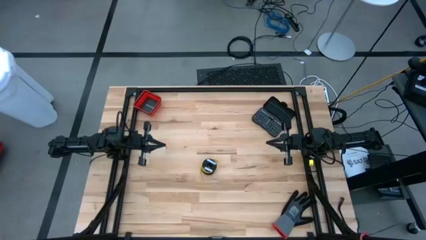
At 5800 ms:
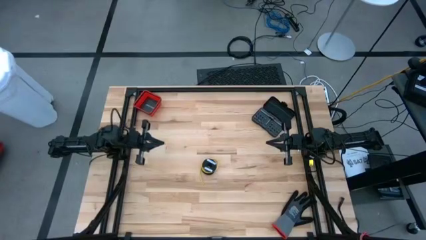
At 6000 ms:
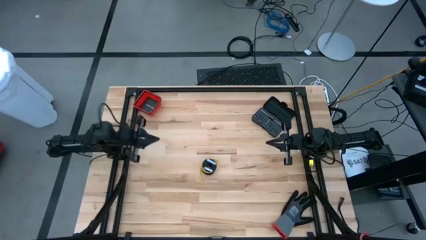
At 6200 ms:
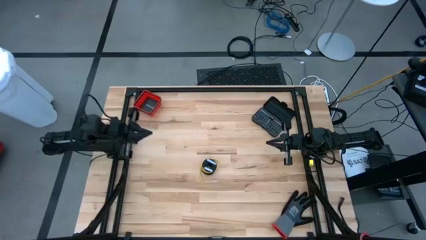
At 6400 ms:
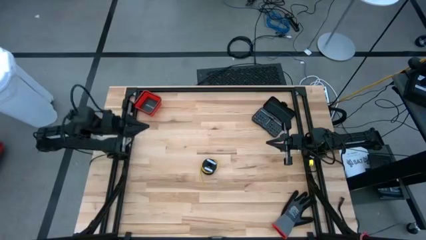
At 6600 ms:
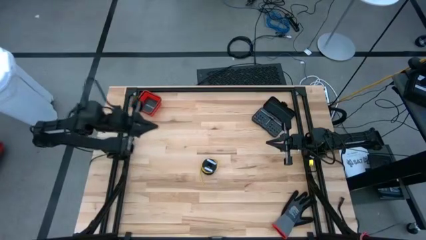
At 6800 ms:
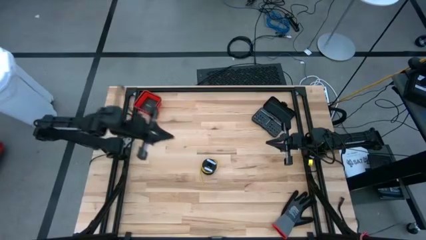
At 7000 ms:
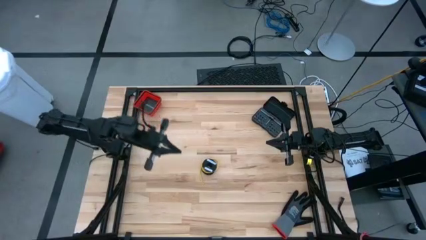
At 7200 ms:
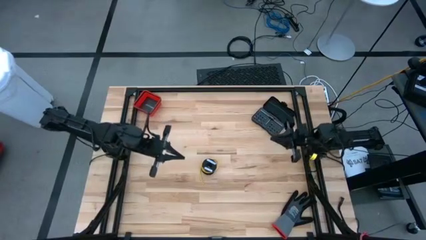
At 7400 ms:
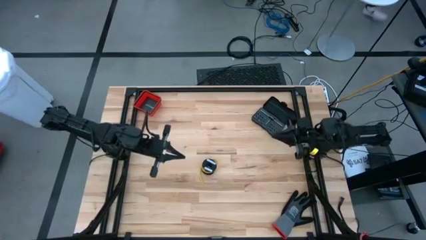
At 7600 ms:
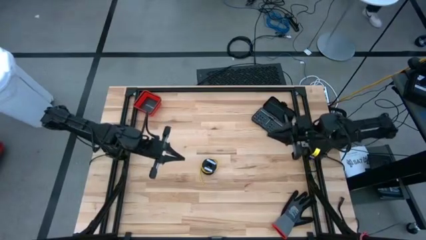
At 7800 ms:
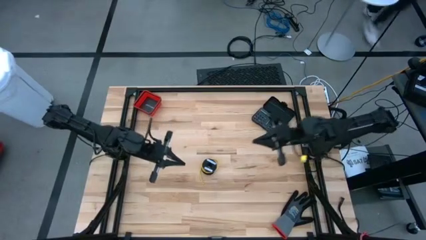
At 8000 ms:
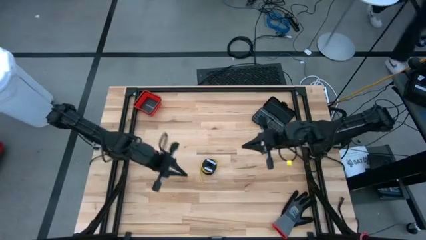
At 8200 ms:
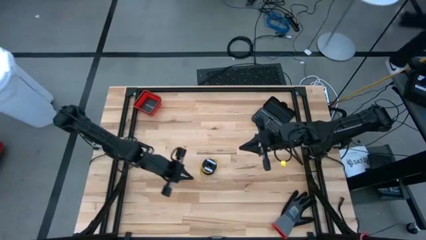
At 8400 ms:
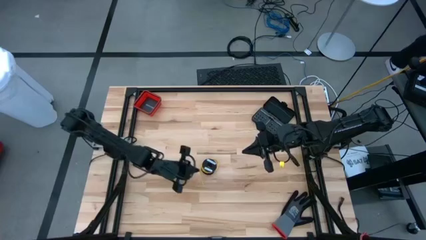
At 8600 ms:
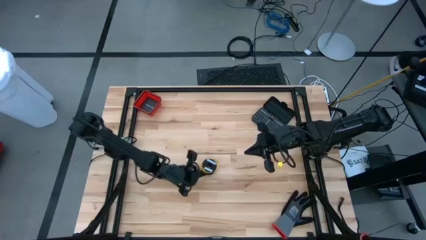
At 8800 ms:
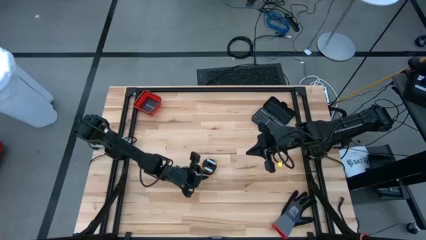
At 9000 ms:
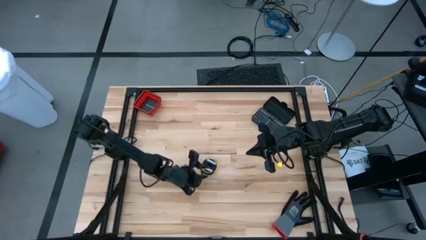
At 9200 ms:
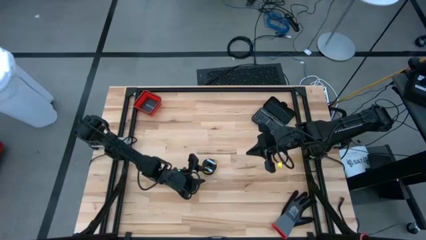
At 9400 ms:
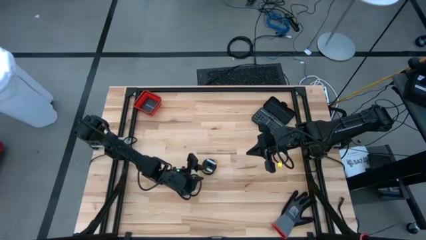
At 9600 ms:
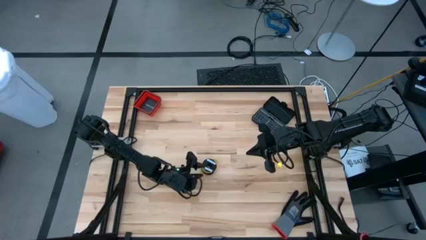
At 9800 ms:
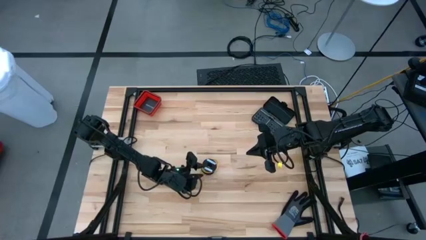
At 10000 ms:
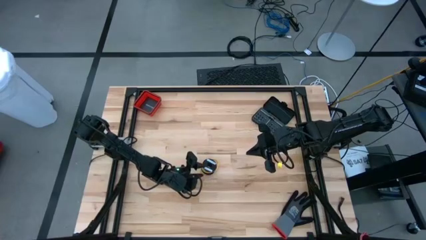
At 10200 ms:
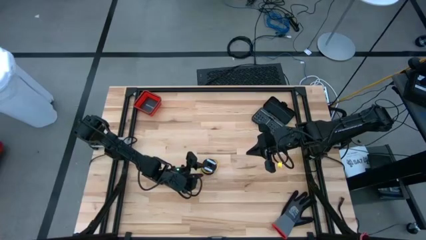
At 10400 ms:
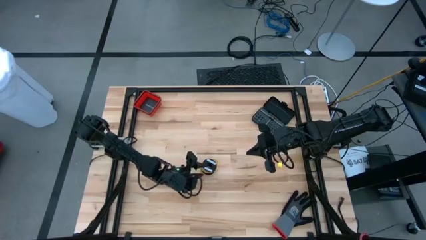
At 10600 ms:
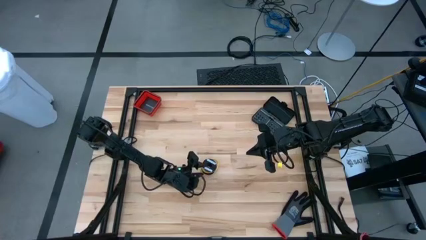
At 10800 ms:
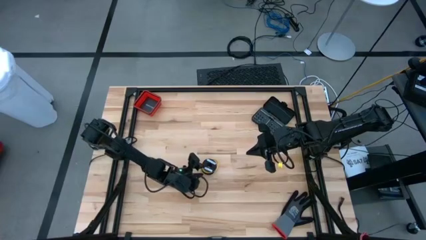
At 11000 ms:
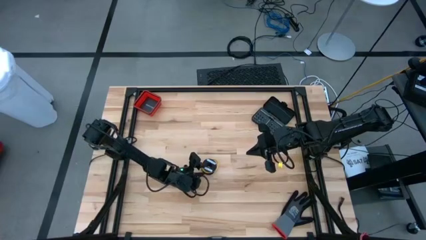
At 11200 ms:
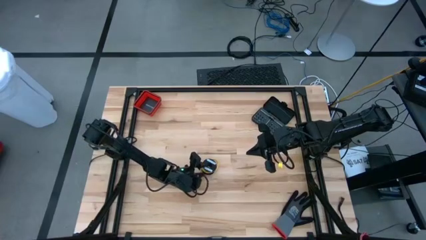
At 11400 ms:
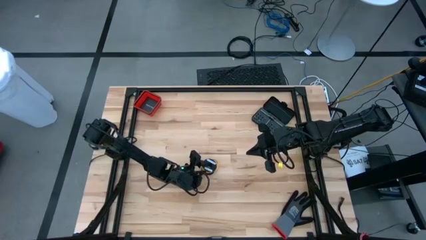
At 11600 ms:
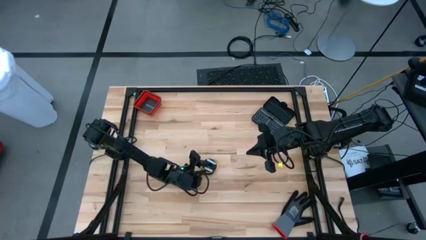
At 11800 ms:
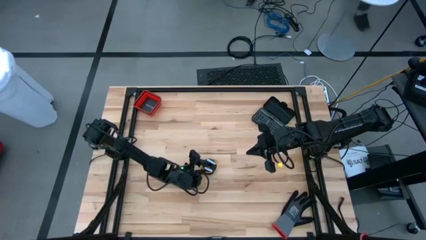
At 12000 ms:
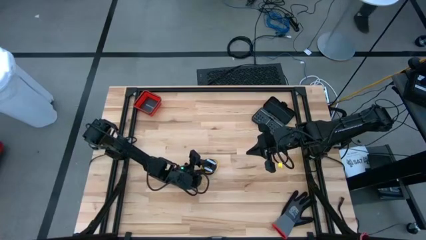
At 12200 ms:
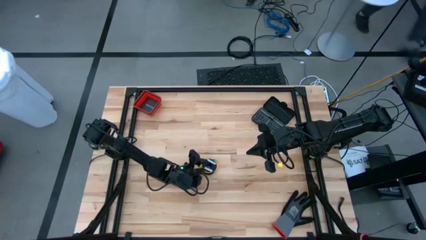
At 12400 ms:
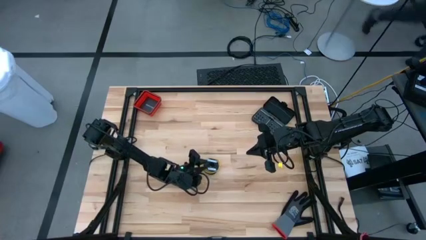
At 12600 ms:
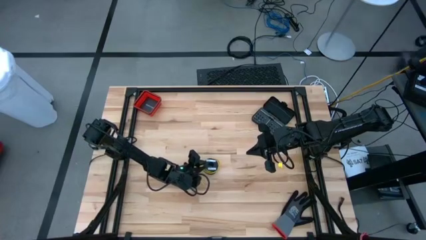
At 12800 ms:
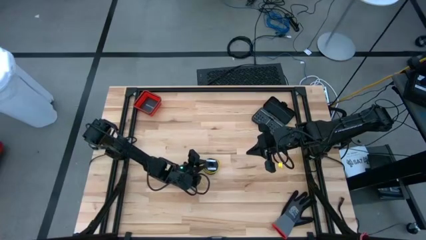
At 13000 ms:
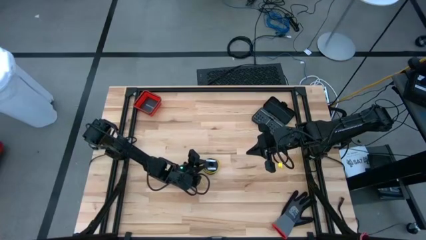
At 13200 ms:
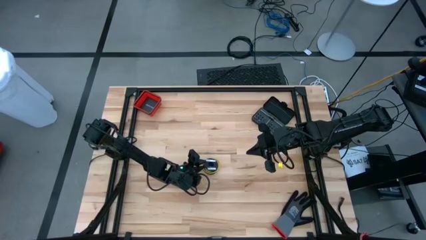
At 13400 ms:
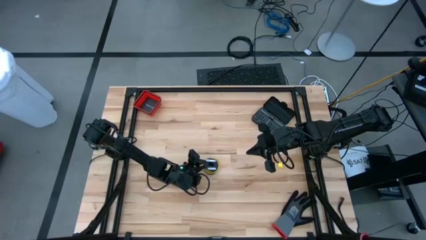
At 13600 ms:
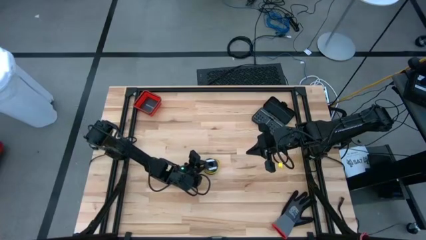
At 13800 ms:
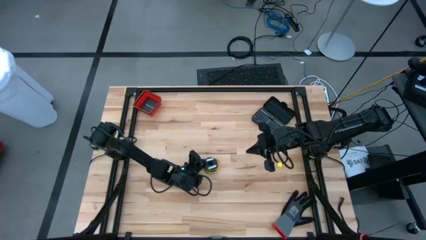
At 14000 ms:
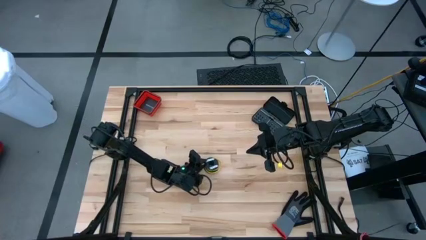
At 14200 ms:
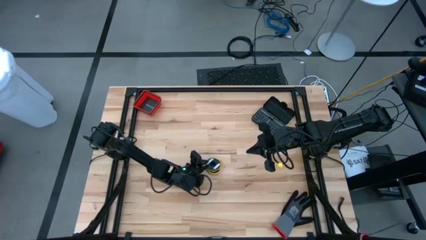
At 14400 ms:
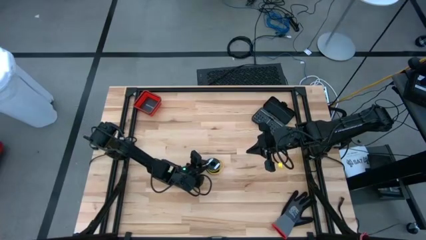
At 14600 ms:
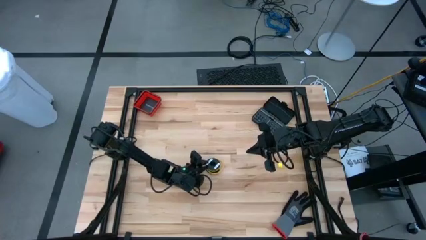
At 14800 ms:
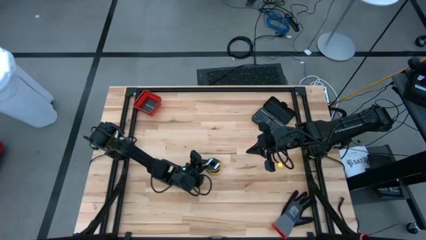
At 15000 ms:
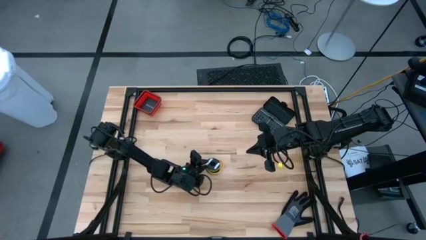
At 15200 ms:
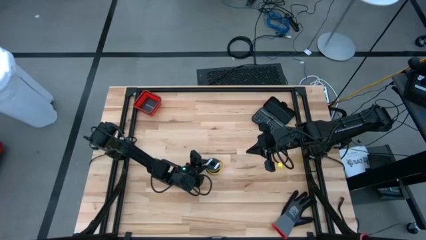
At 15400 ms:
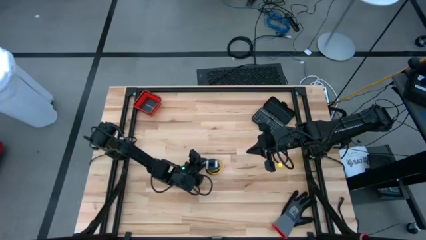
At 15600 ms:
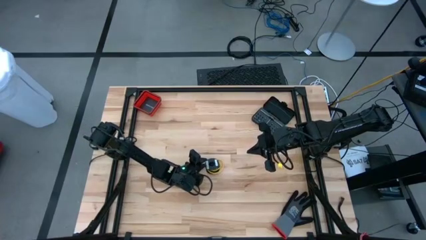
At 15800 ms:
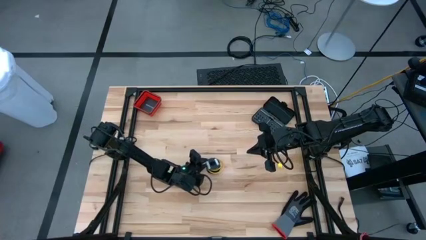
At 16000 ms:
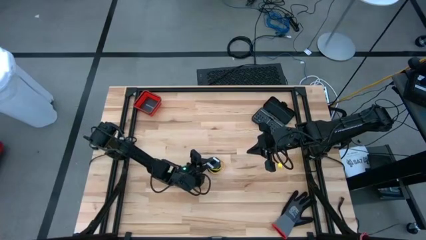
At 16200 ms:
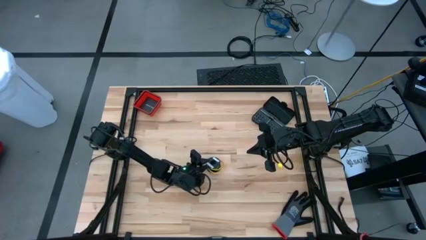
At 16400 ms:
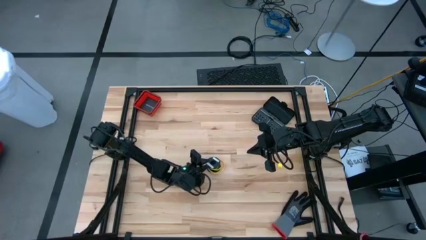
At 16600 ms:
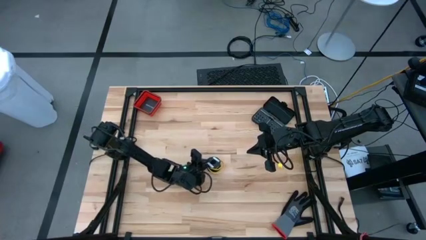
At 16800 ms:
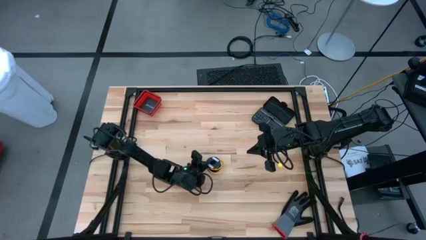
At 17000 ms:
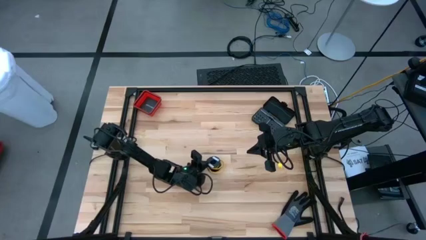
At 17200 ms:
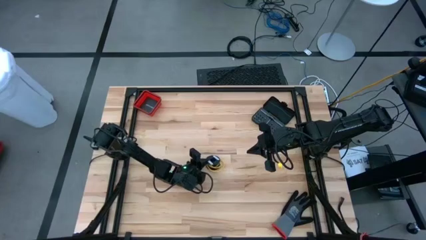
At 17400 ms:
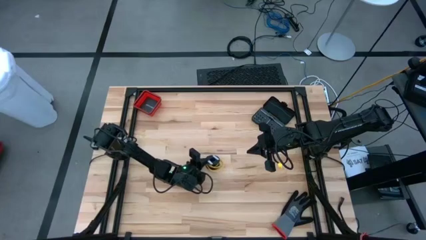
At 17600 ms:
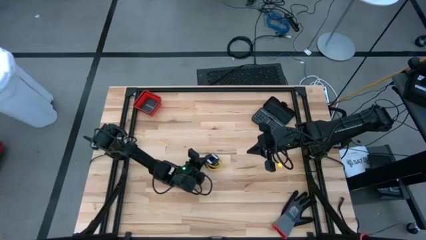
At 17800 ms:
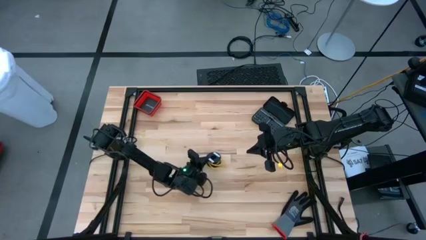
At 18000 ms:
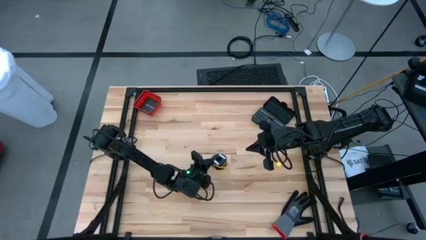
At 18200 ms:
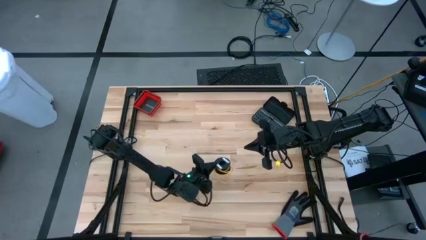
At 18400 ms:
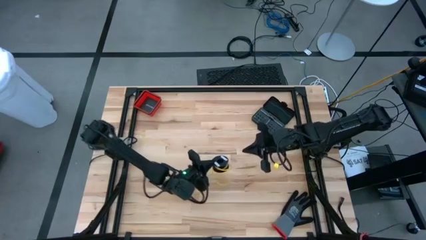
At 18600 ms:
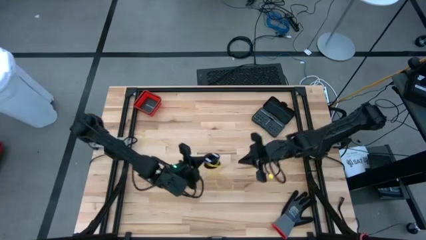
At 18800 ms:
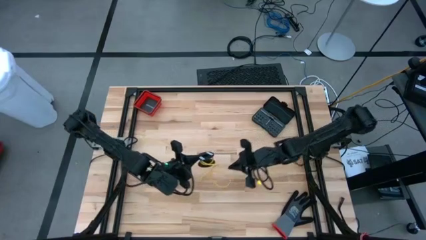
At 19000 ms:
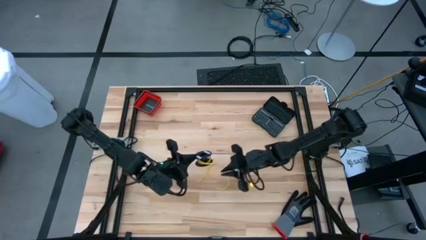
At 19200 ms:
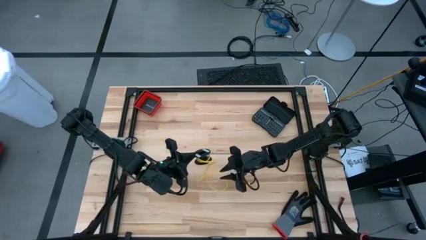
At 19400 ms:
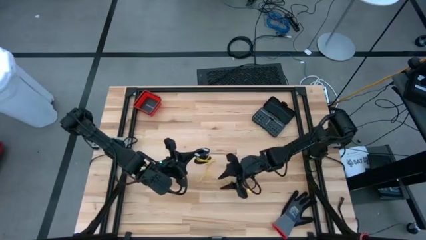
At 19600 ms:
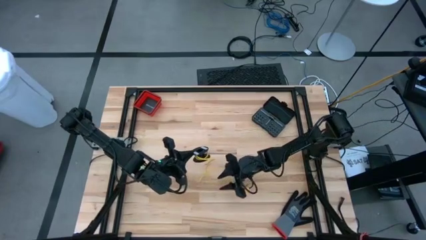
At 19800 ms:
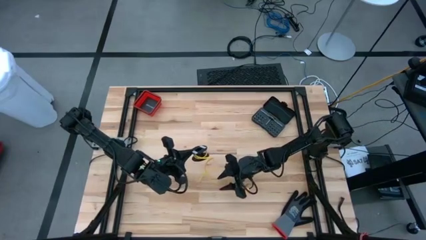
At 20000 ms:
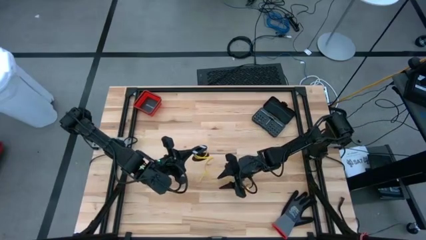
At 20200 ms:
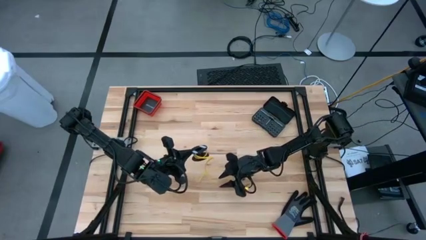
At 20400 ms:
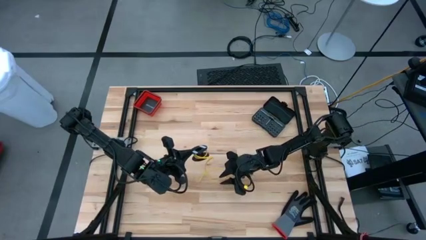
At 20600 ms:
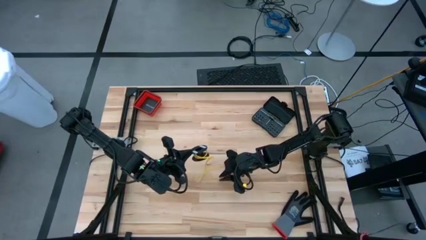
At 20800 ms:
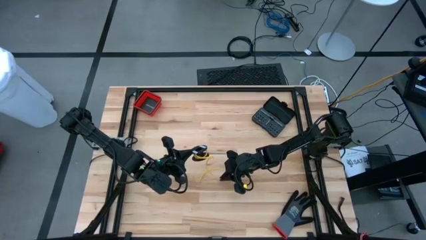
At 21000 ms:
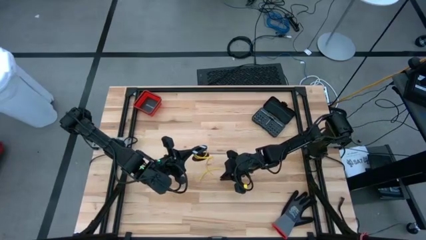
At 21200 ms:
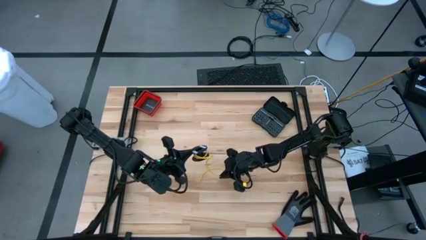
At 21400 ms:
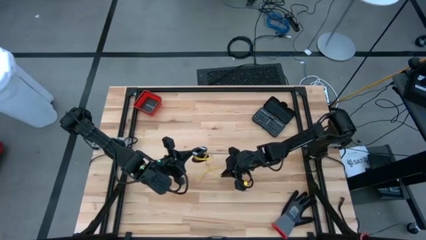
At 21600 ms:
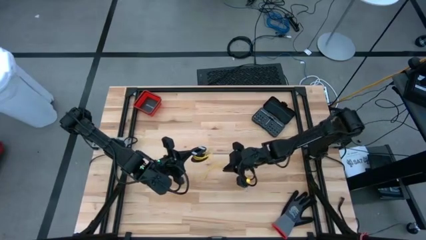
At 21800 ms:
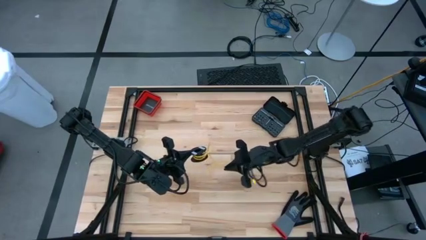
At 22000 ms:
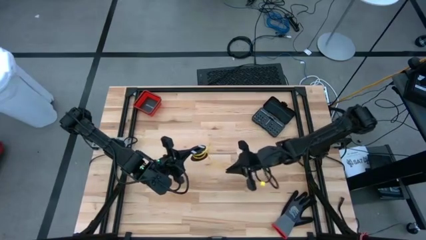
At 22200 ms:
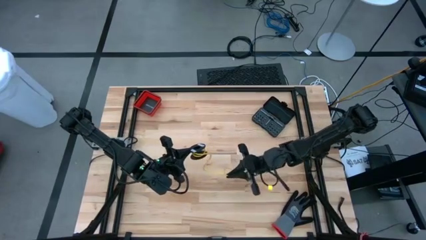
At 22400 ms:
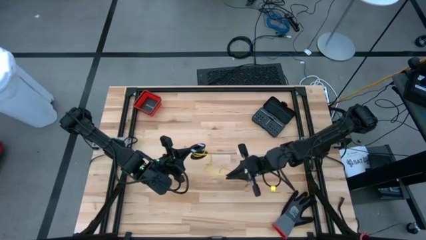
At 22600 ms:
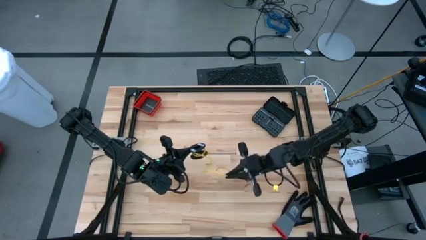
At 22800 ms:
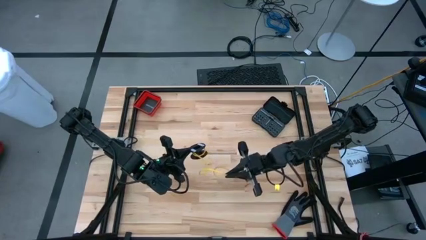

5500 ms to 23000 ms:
Task: Coil cords
Uncoil the yellow cable wire from the spool
